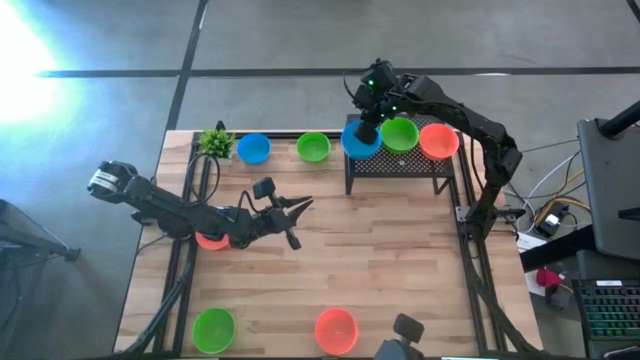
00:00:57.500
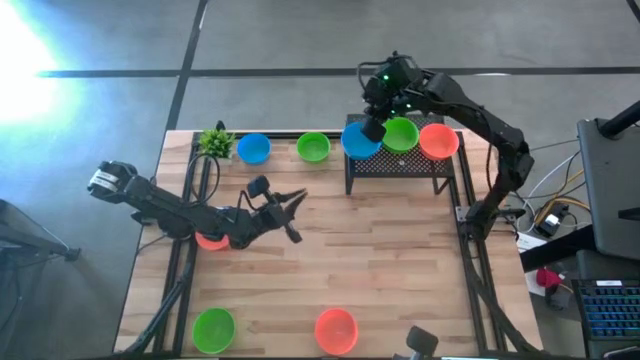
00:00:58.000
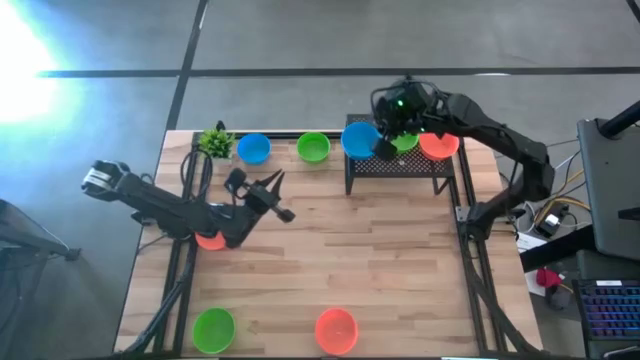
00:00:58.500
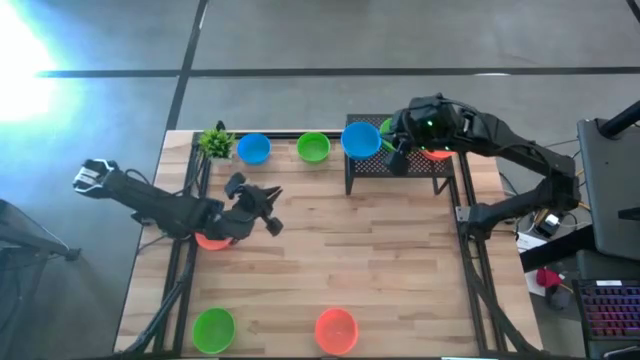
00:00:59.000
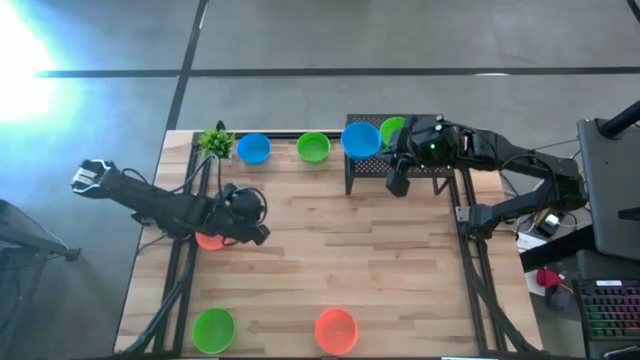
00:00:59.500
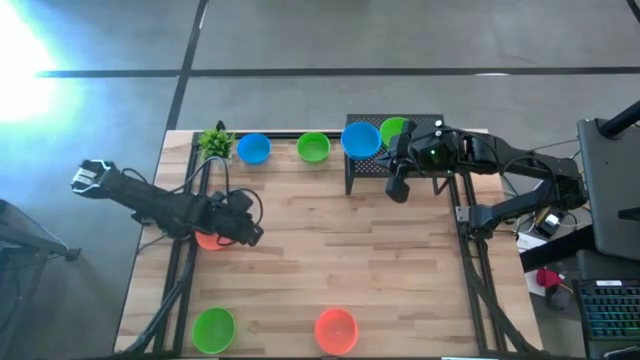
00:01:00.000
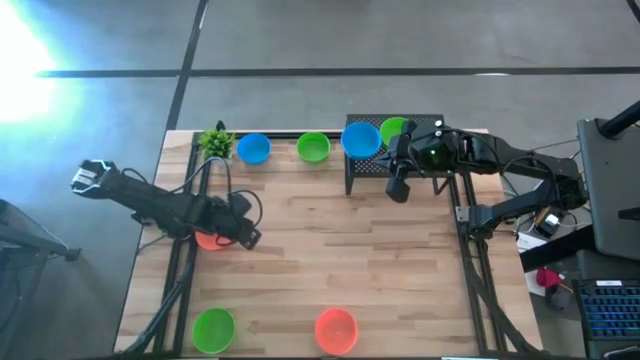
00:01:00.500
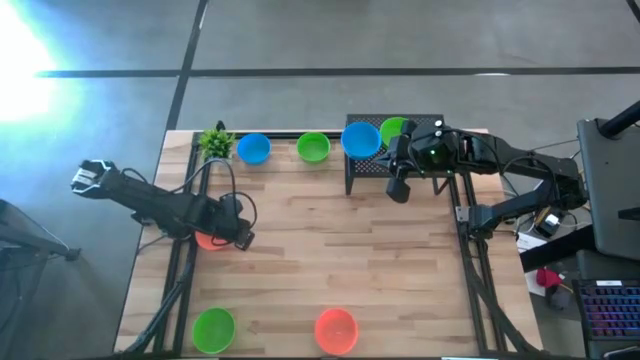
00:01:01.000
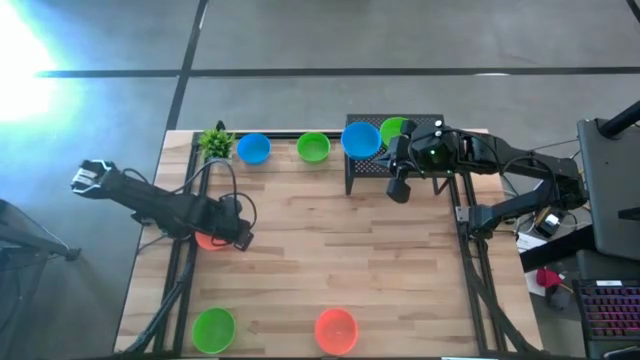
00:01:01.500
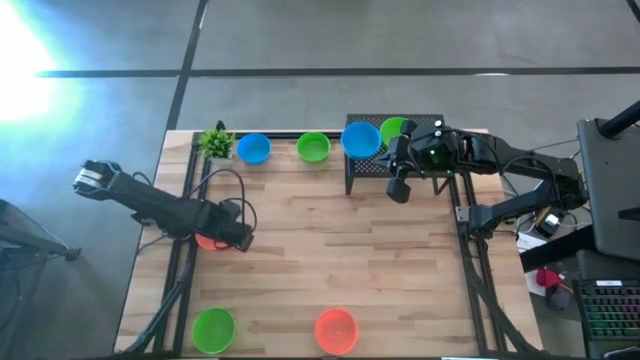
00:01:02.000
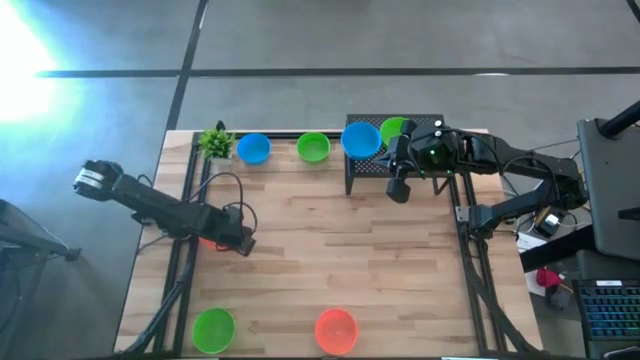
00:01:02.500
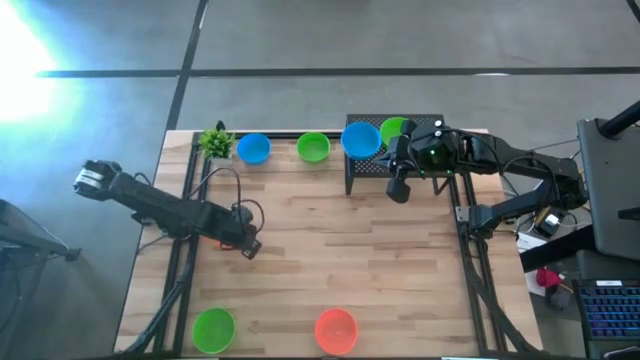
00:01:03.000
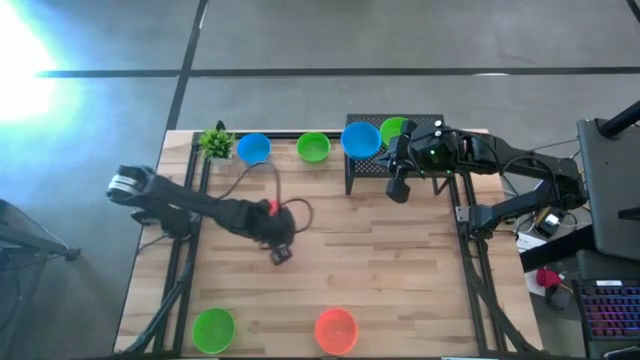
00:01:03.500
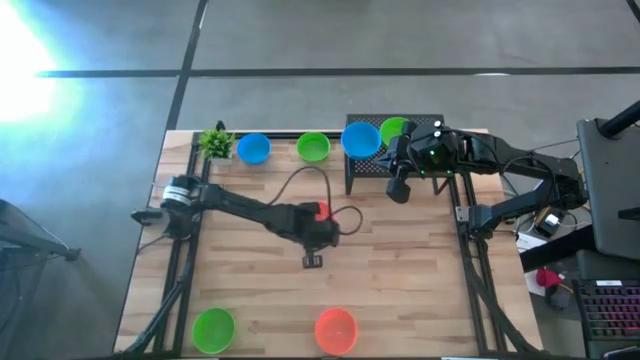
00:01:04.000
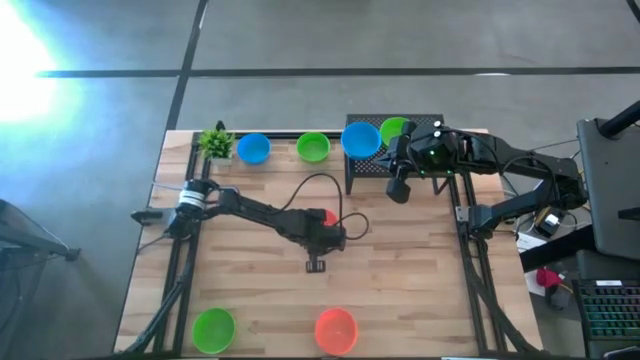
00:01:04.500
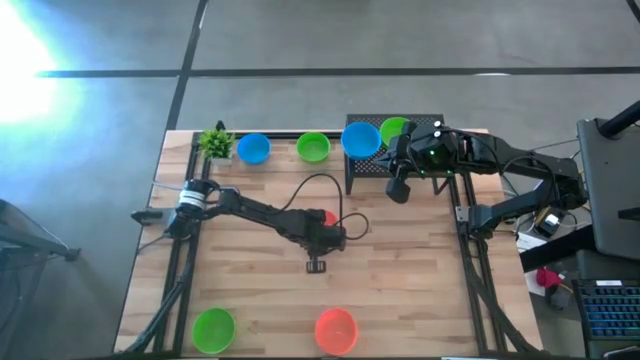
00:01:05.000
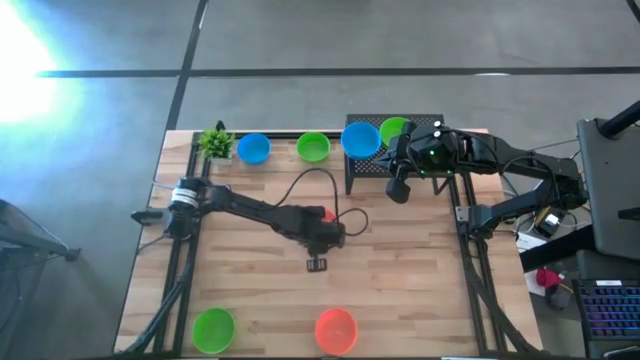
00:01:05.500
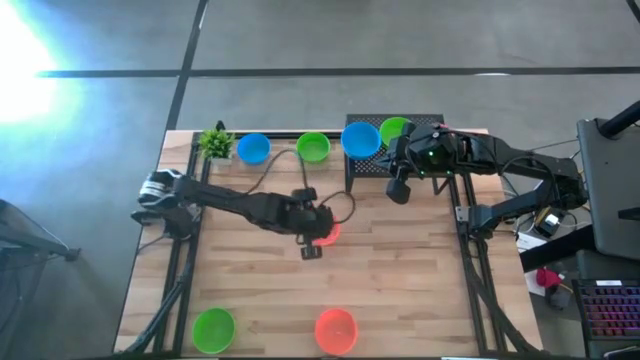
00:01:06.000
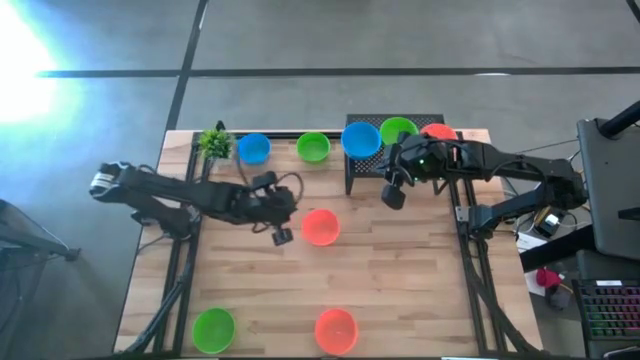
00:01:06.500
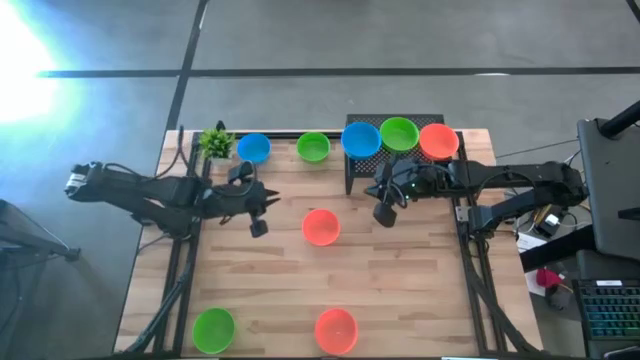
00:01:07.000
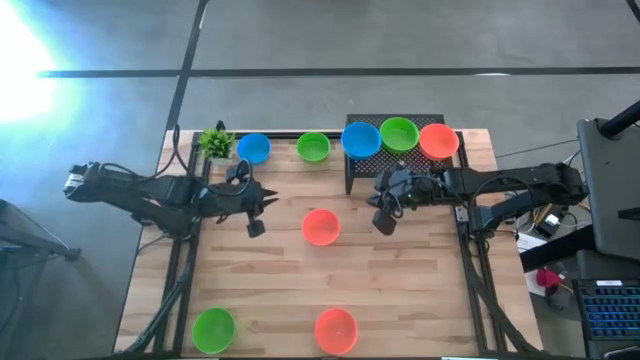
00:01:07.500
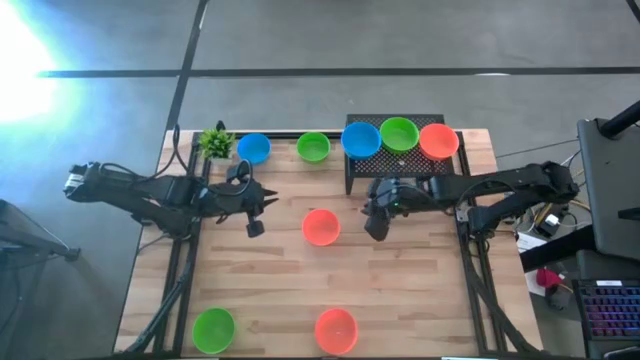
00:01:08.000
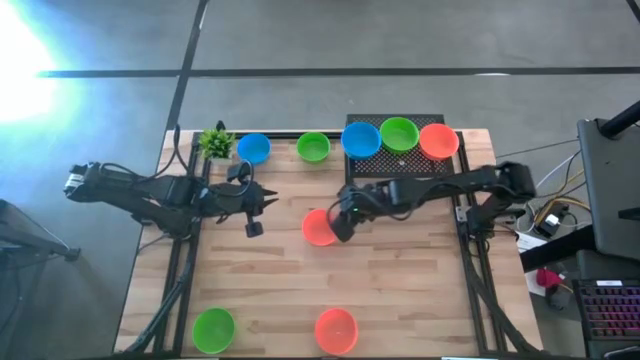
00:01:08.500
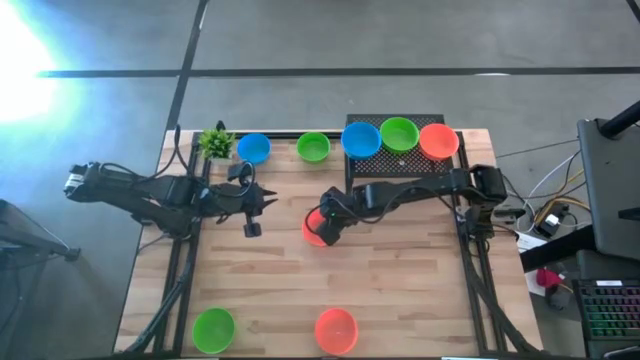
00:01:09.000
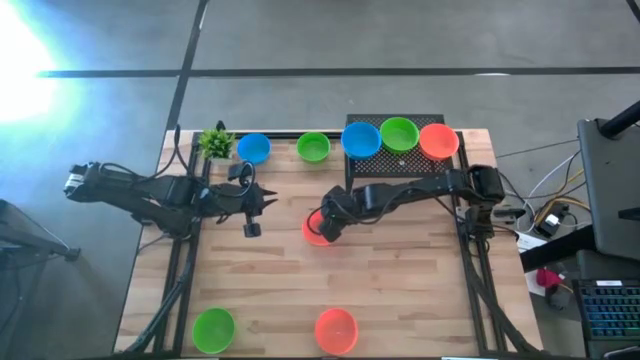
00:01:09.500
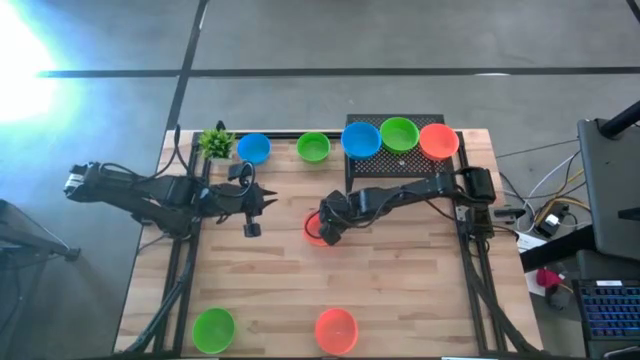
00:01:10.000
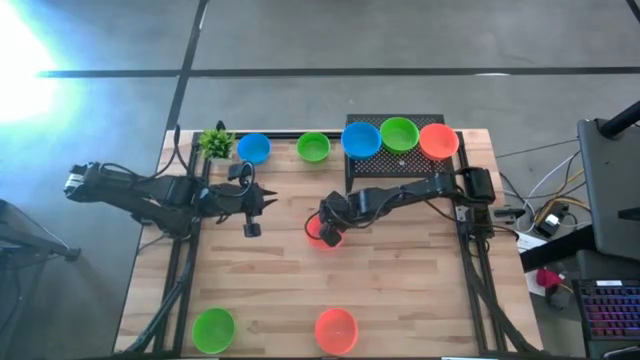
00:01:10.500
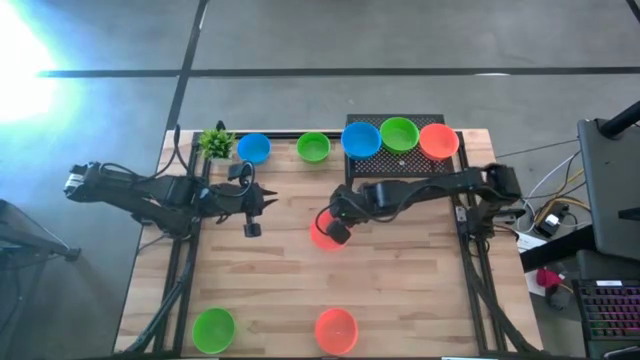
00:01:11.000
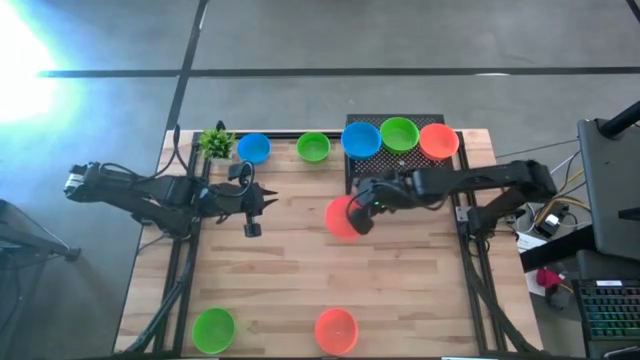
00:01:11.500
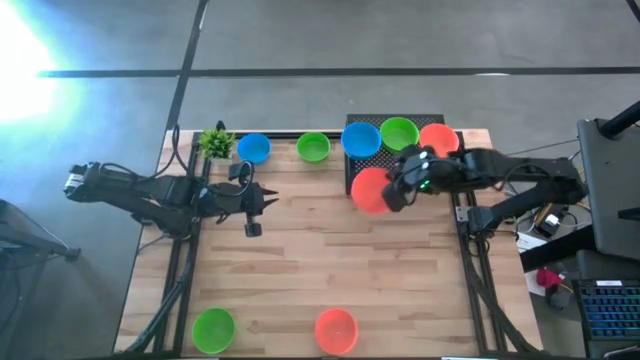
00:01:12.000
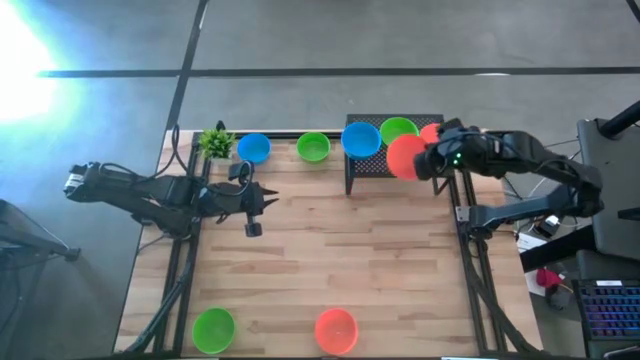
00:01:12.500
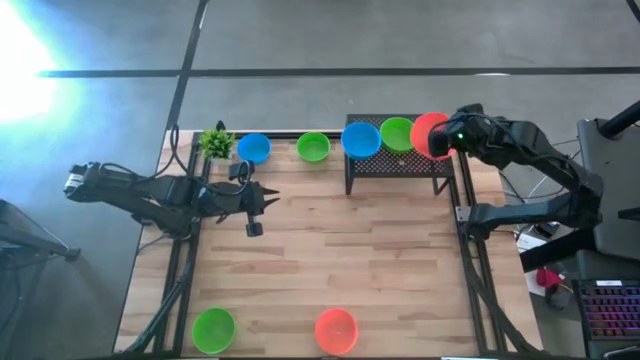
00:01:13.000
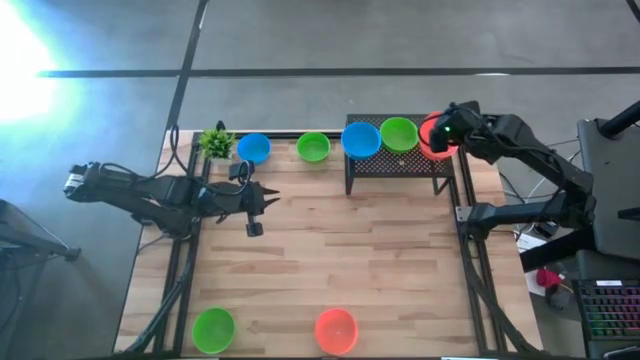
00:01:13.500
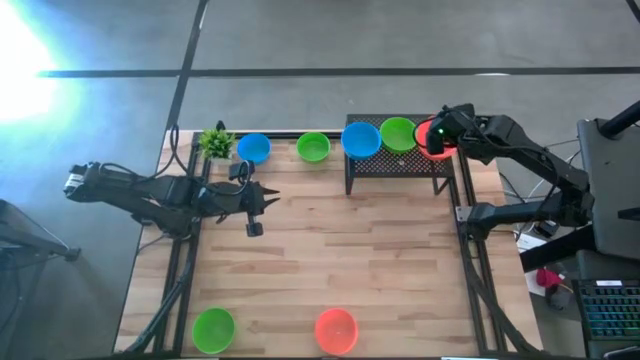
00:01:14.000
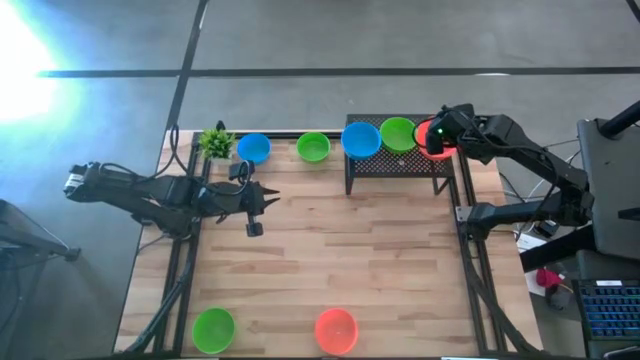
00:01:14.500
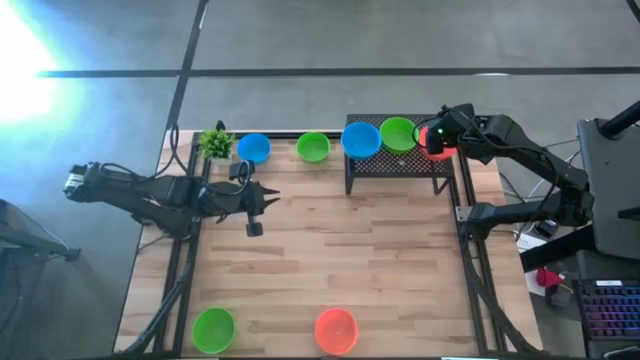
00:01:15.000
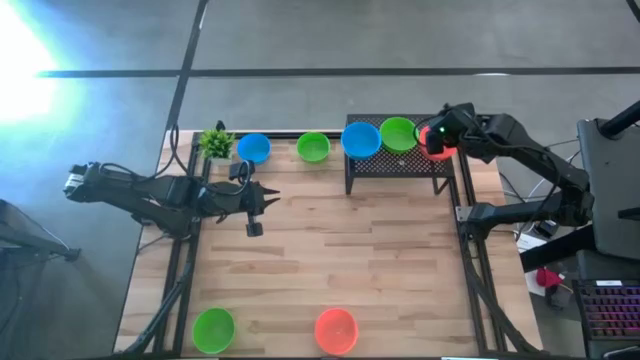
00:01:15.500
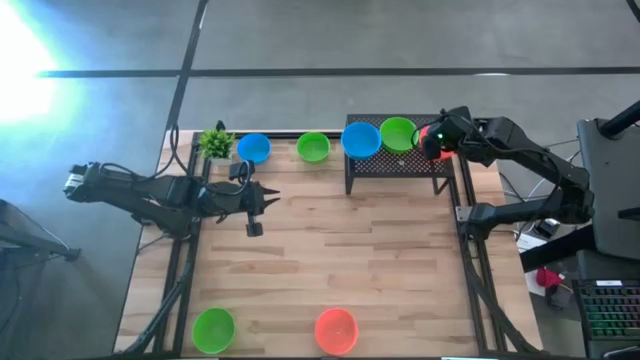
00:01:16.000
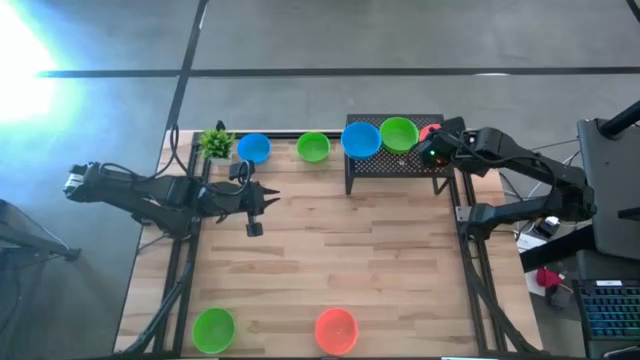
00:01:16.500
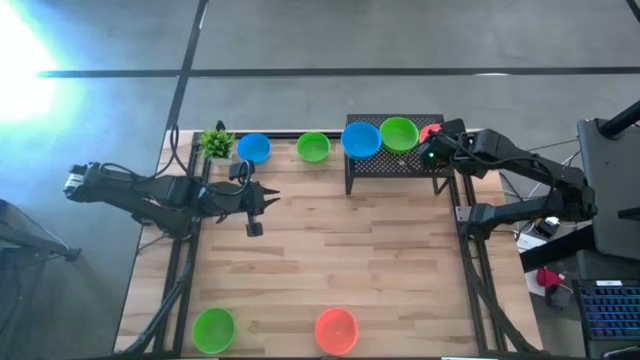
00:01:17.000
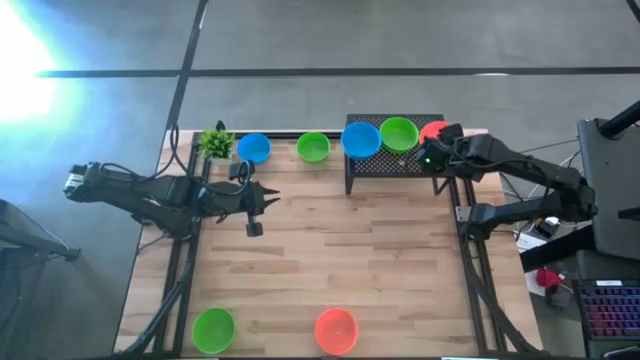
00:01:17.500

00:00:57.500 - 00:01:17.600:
Task: Pick & Place Mini bowls
Stack the top orange bowl on the orange bowl on the shelf
